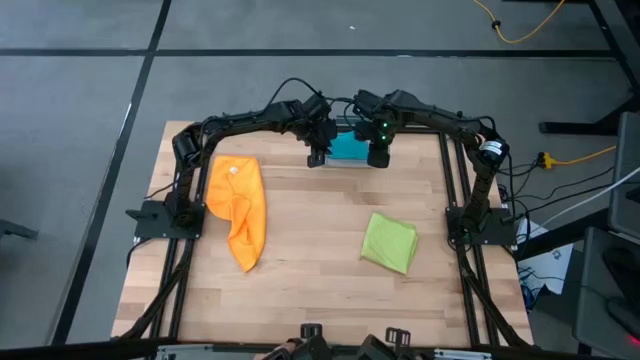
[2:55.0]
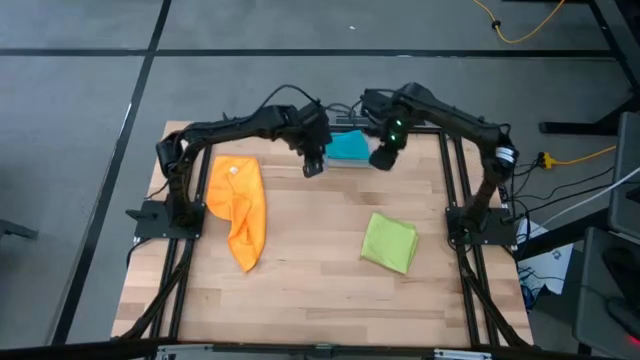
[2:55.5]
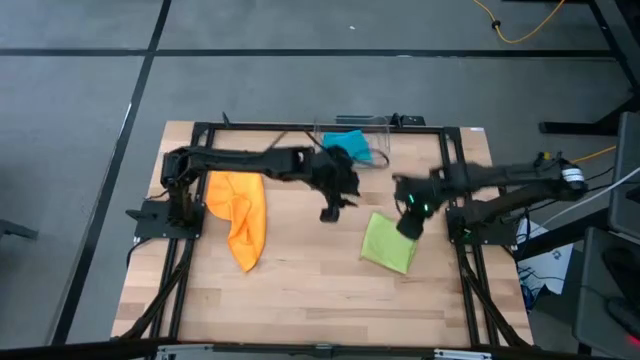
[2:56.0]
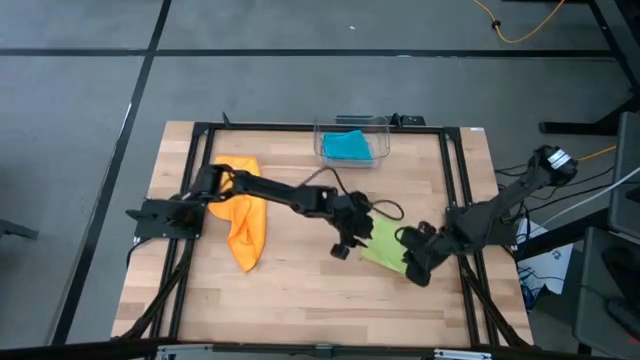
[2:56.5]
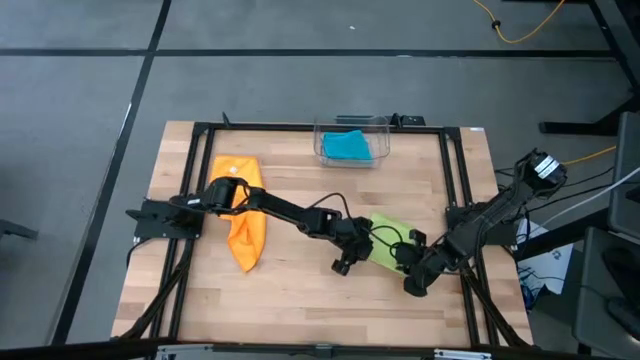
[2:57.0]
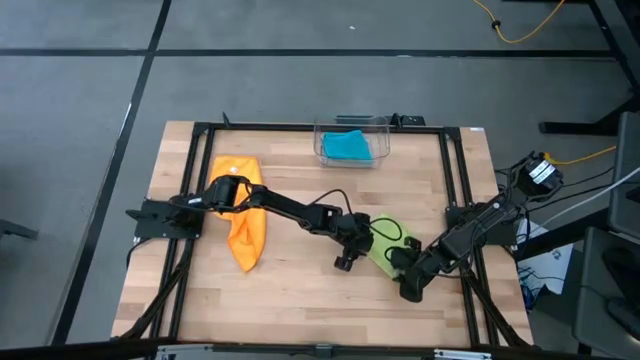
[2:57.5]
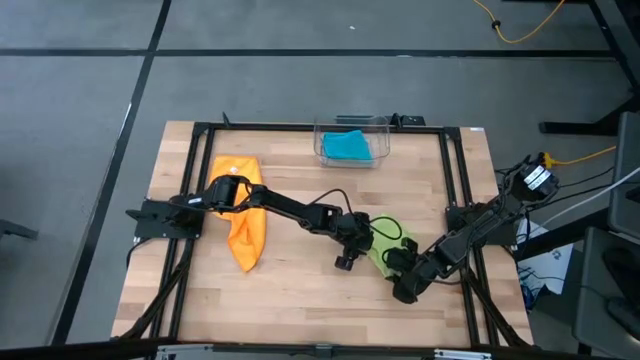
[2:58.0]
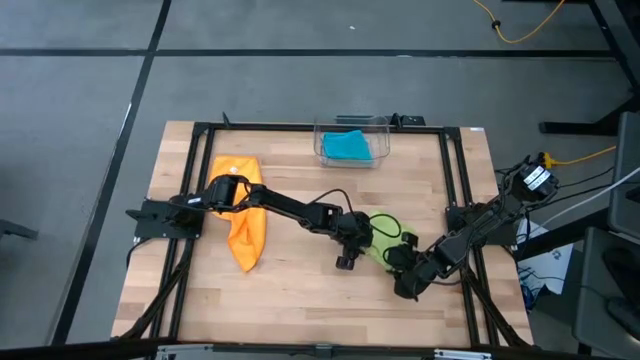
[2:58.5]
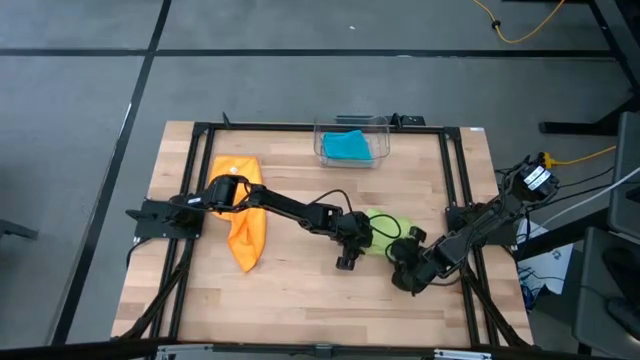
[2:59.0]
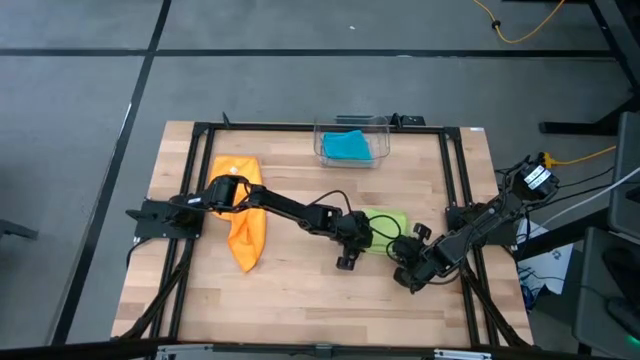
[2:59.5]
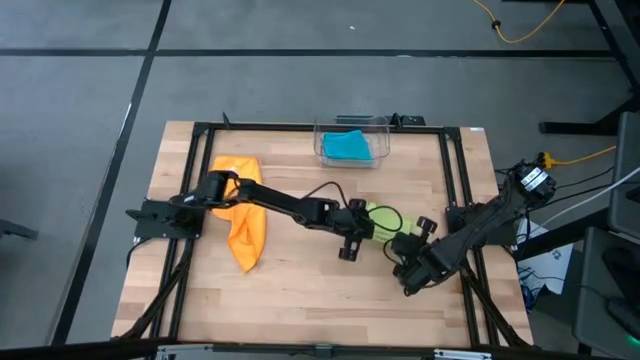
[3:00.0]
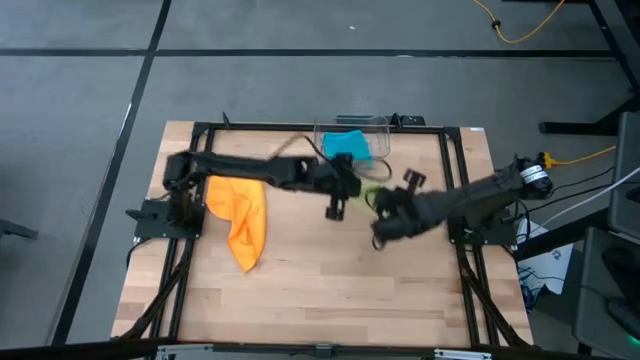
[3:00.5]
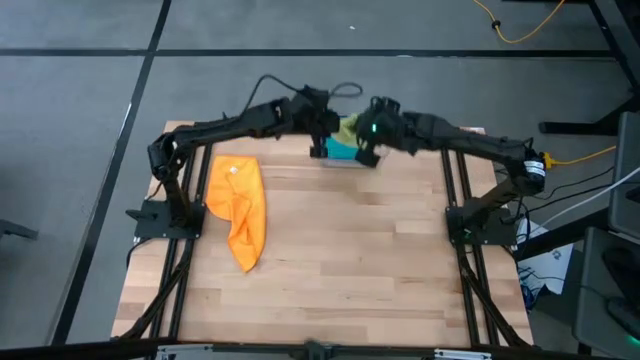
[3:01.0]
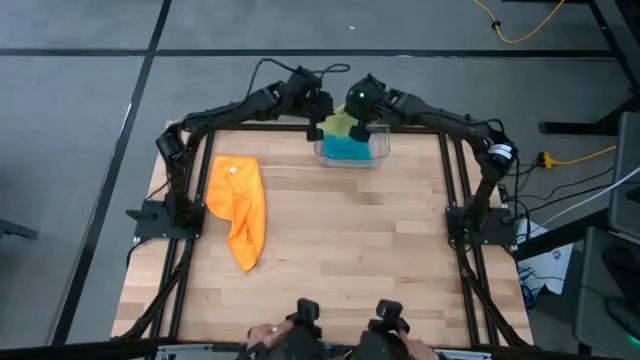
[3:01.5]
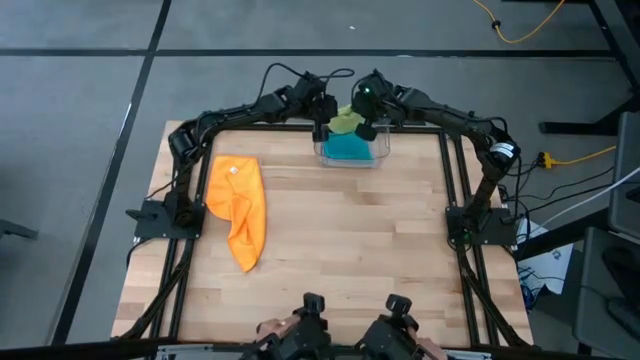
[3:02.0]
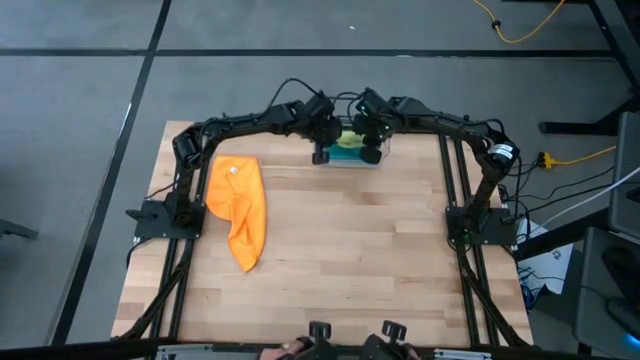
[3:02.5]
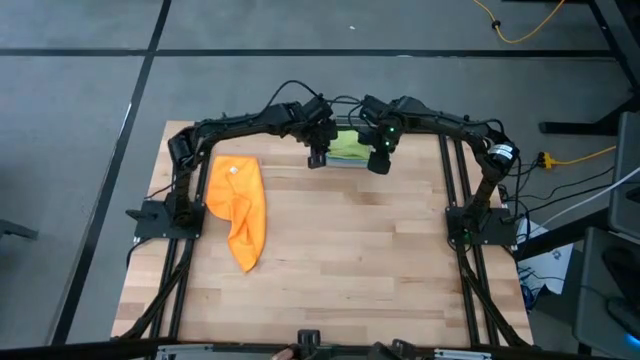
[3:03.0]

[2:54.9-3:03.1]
Task: Fold microfiber towels
Put the green microfiber towel into the transparent bin

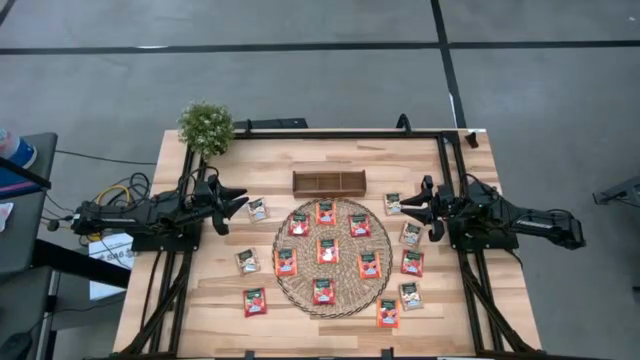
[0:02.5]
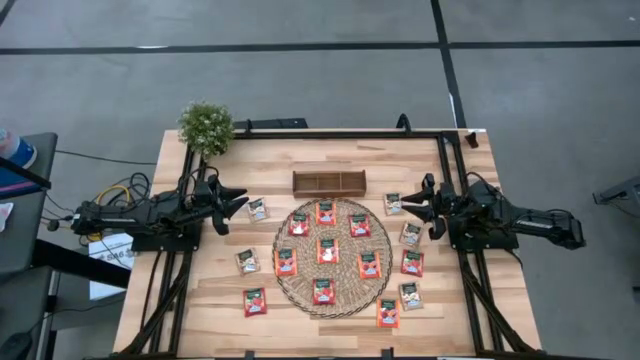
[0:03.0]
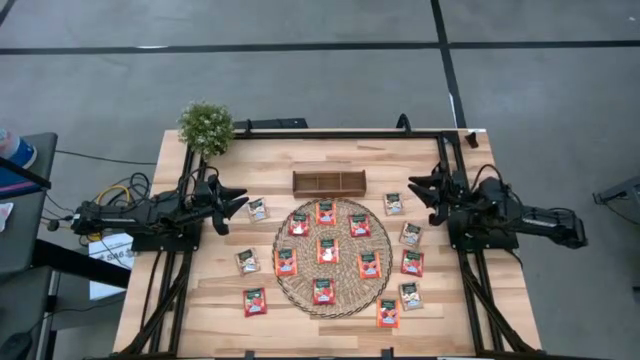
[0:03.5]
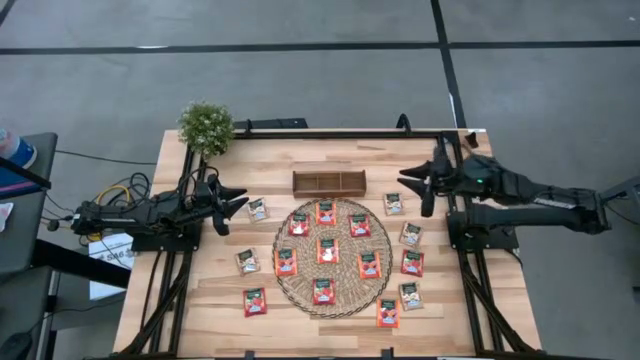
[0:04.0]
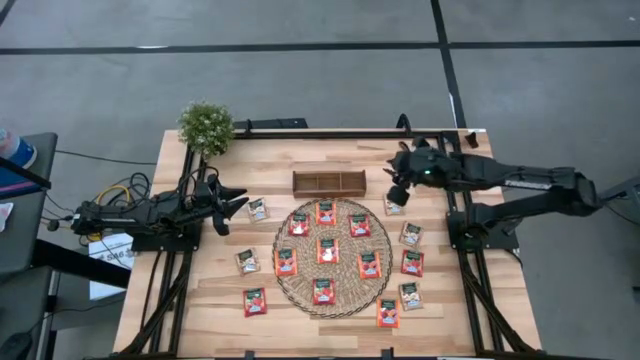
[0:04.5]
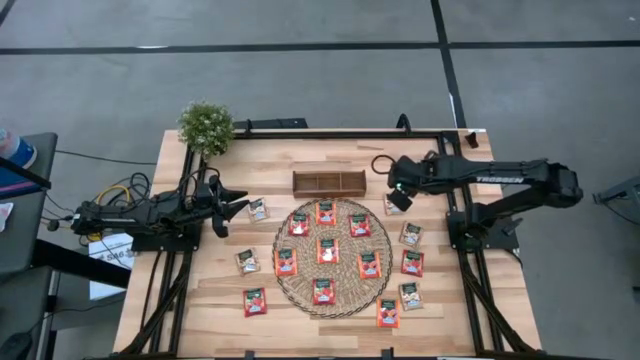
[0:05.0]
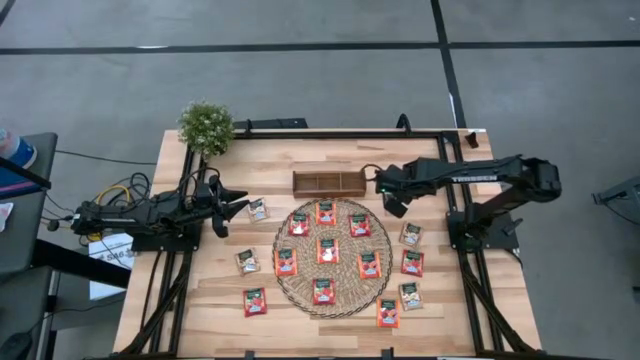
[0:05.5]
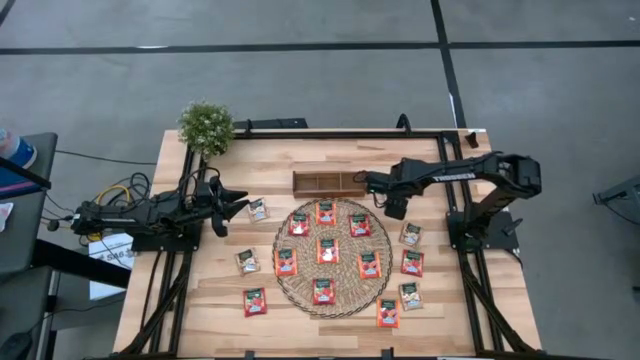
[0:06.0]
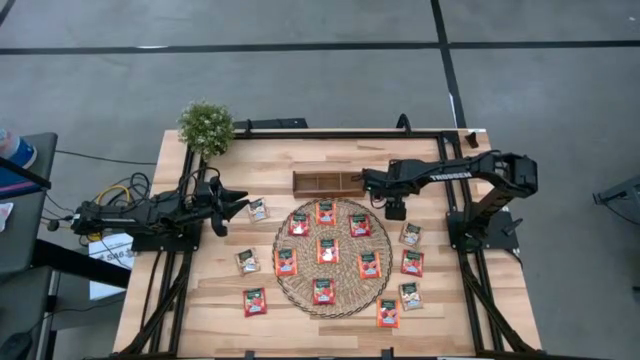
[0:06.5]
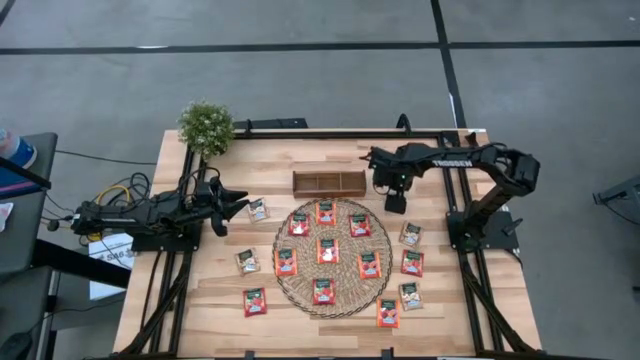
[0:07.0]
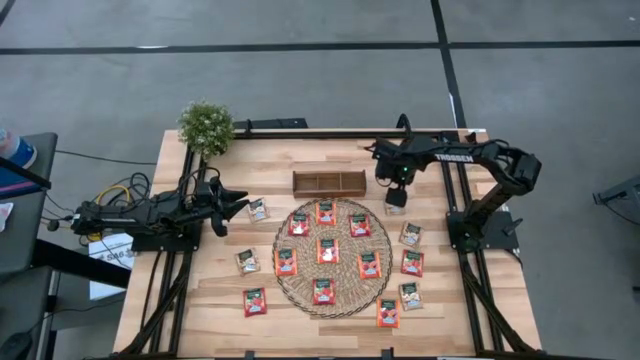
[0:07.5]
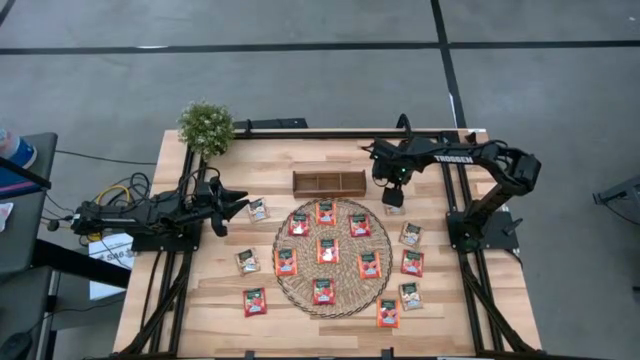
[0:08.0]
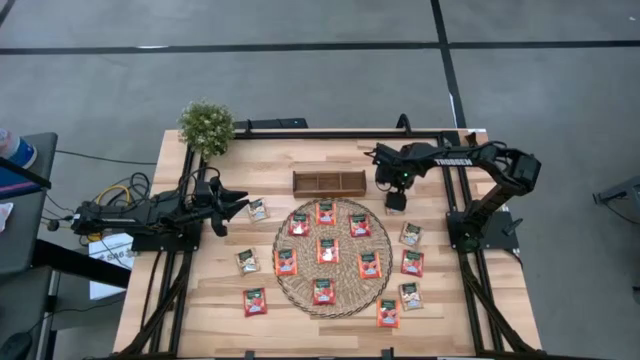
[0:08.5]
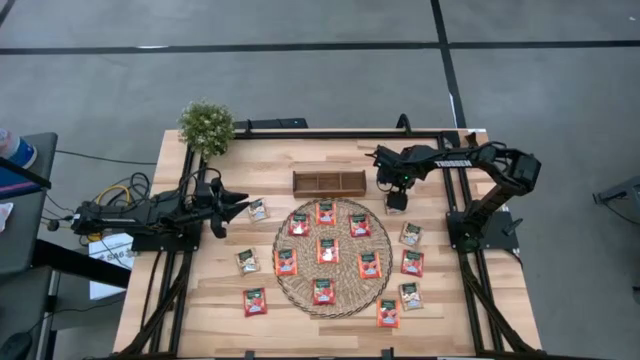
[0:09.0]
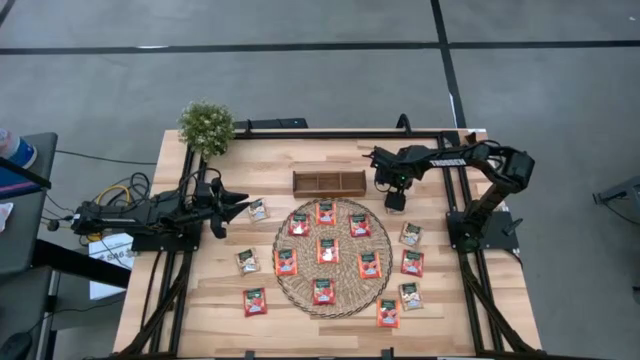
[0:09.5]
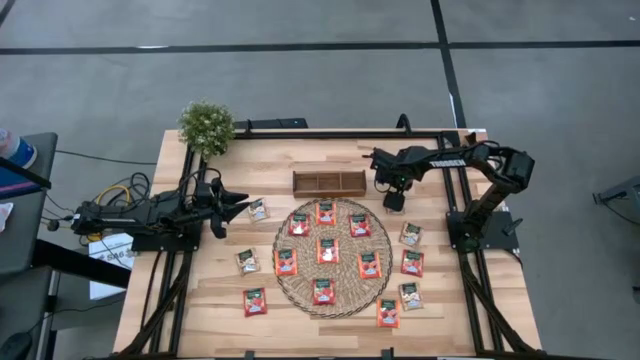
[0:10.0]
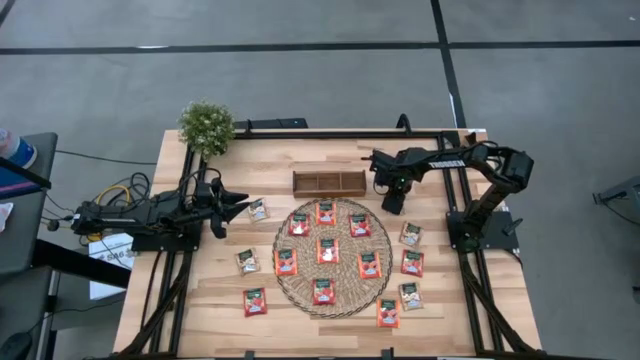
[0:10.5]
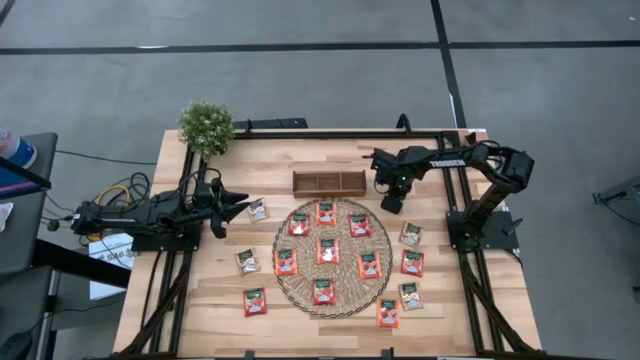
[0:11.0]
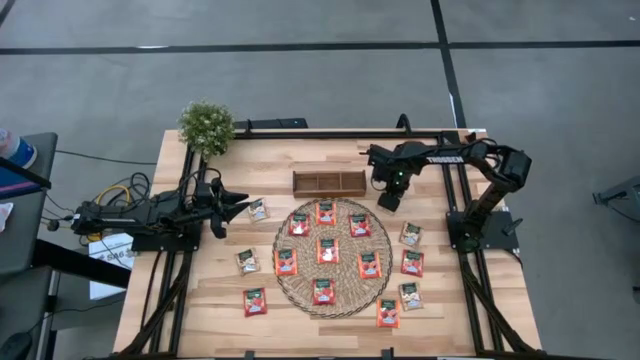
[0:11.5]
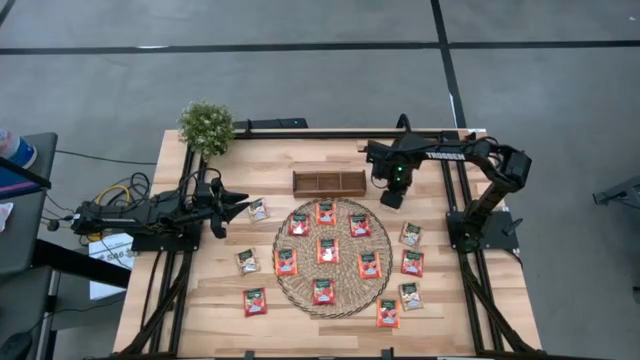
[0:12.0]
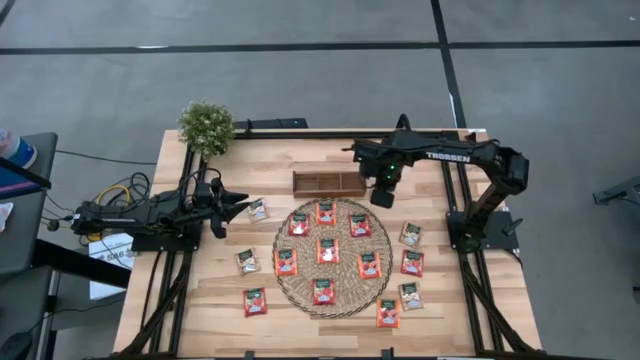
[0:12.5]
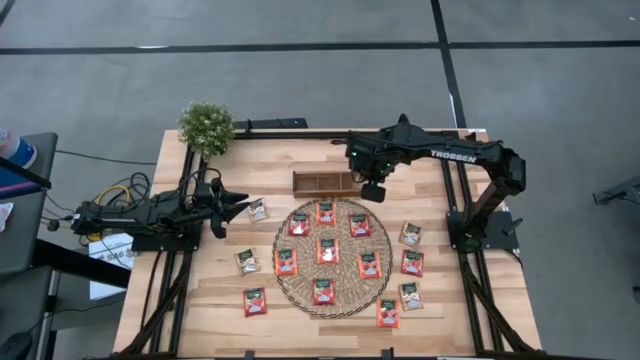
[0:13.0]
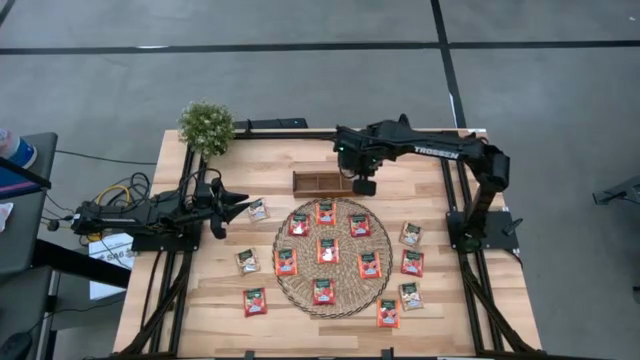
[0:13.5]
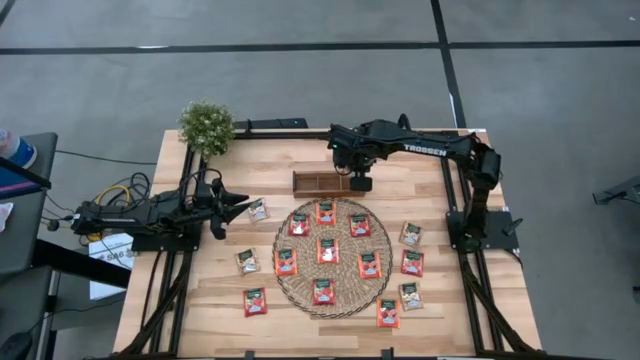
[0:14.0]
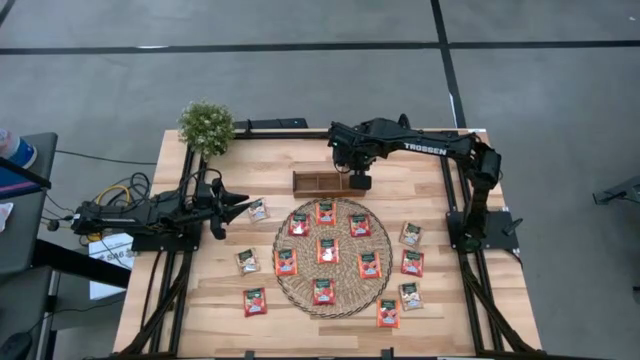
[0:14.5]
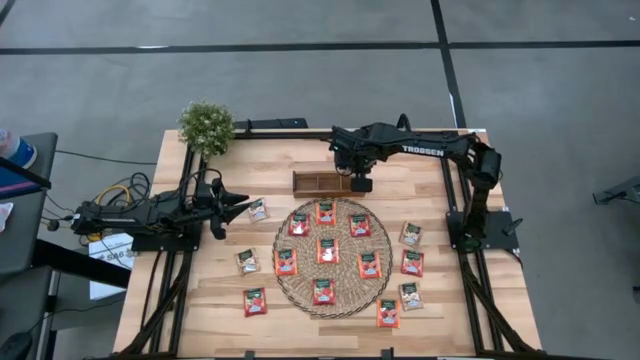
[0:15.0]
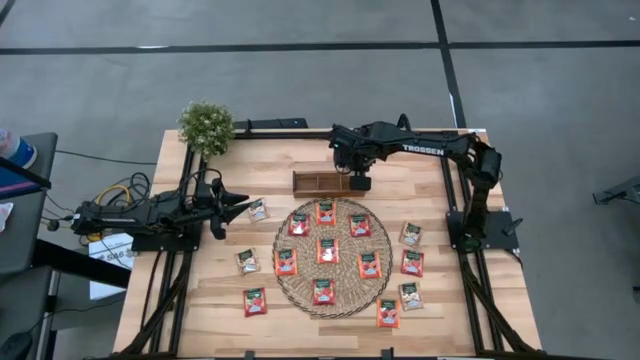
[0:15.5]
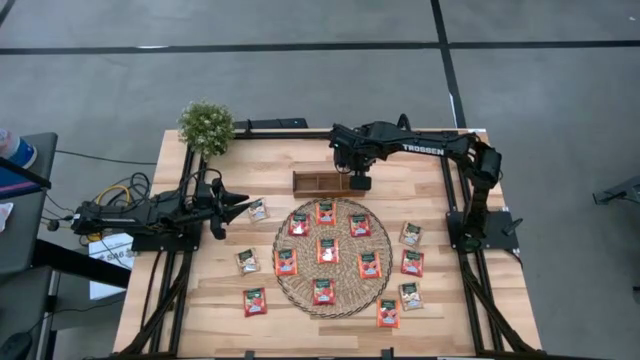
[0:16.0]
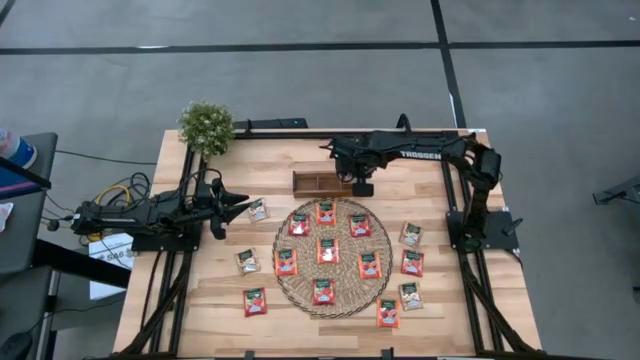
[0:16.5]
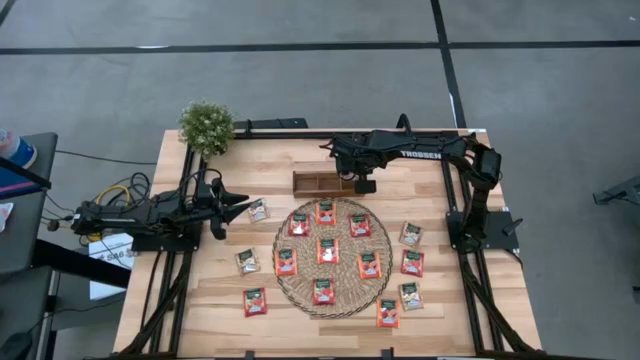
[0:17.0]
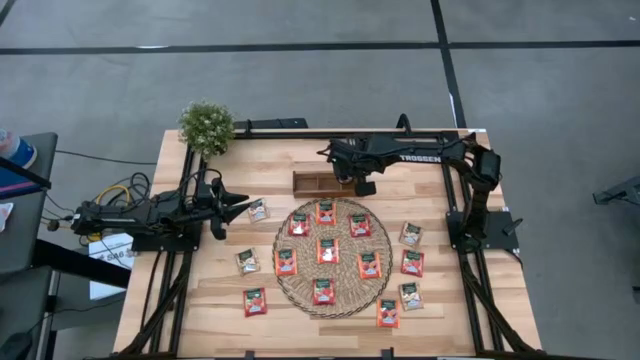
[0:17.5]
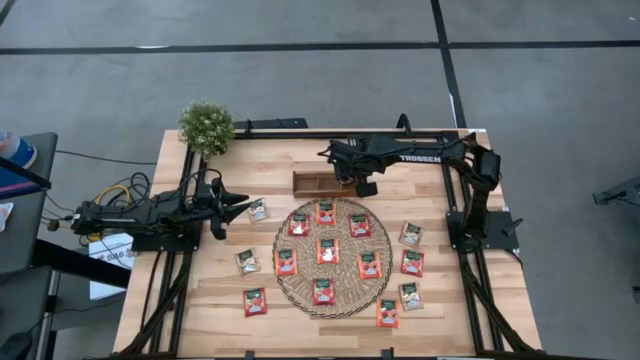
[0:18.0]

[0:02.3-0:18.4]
Task: Pick & Place Tea
Put the brown tea bag into the right section of the wooden organizer
